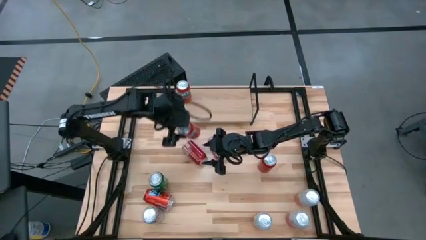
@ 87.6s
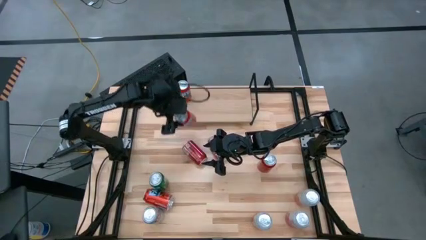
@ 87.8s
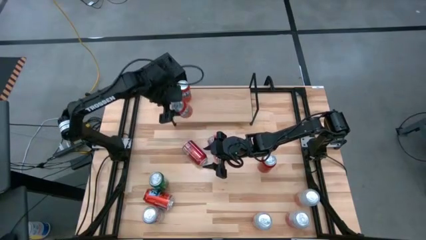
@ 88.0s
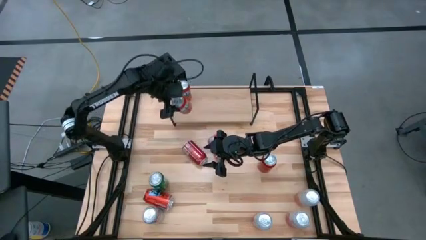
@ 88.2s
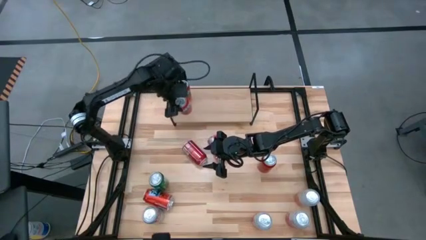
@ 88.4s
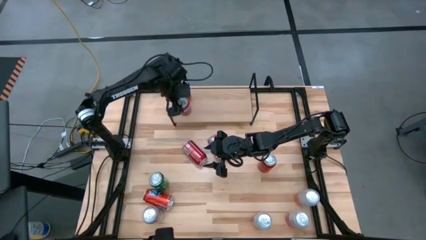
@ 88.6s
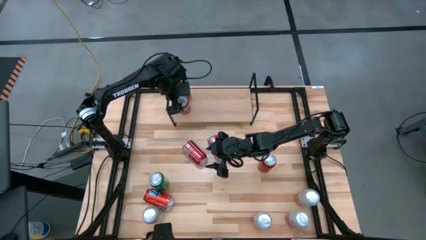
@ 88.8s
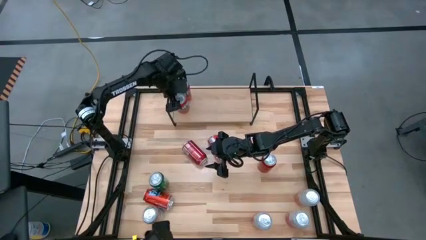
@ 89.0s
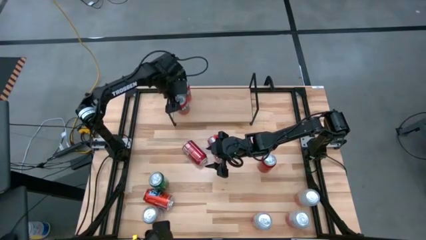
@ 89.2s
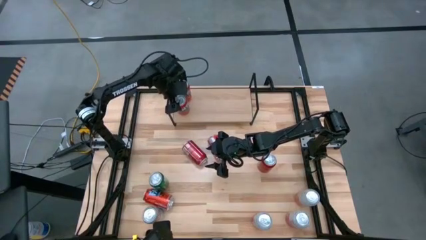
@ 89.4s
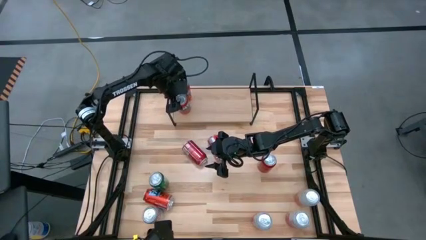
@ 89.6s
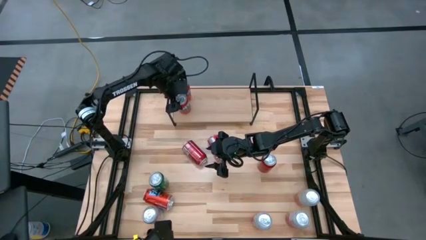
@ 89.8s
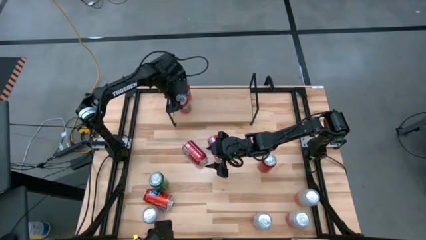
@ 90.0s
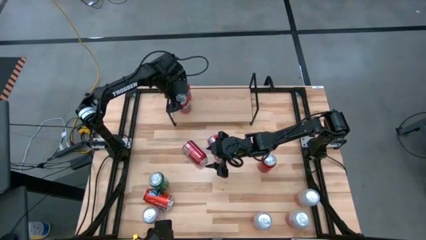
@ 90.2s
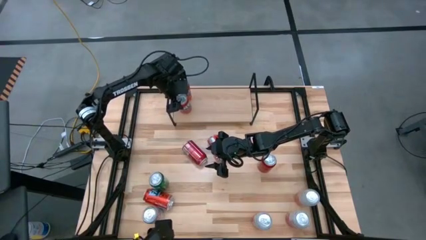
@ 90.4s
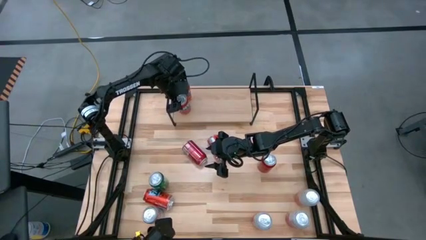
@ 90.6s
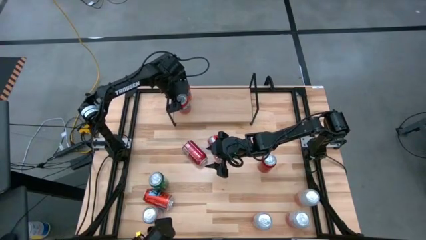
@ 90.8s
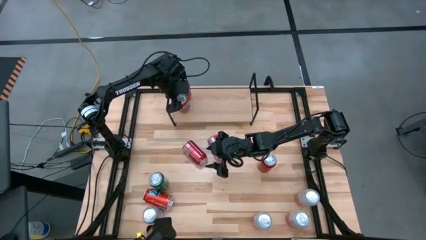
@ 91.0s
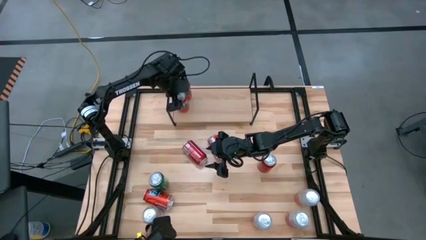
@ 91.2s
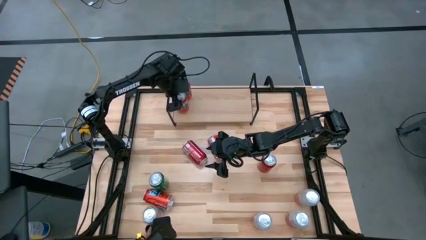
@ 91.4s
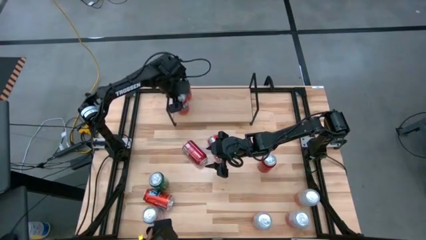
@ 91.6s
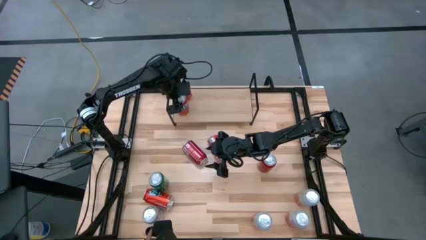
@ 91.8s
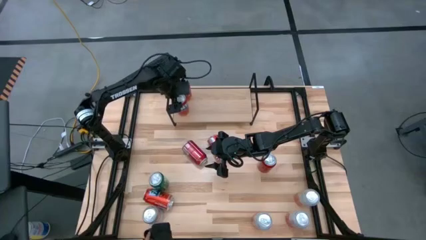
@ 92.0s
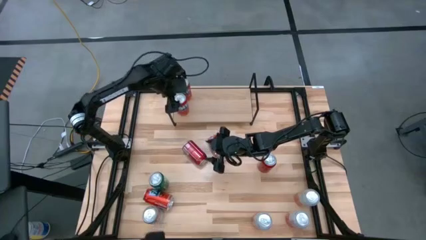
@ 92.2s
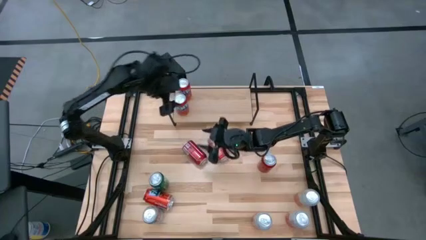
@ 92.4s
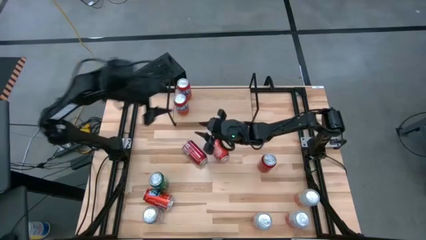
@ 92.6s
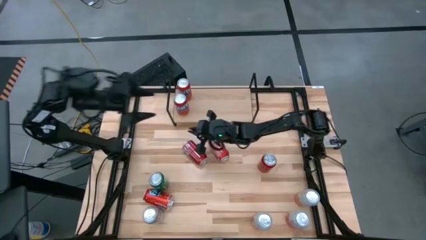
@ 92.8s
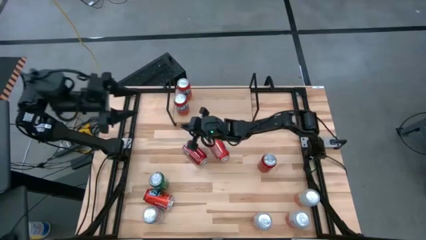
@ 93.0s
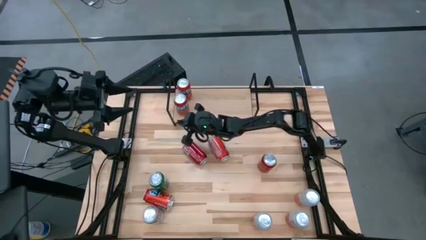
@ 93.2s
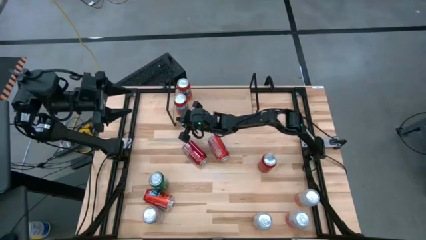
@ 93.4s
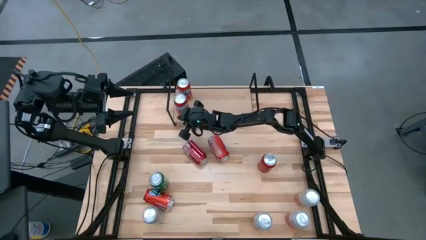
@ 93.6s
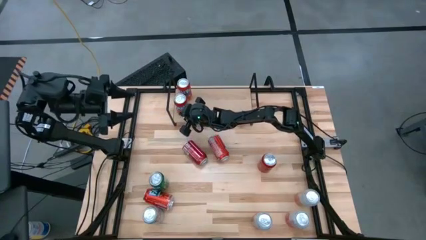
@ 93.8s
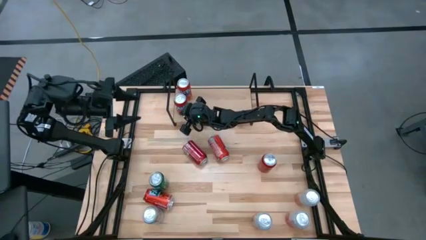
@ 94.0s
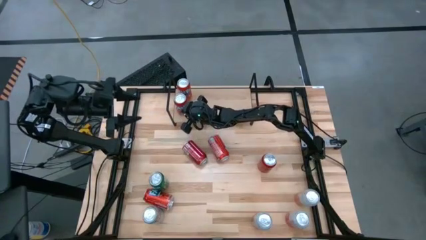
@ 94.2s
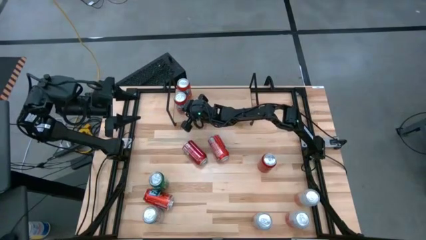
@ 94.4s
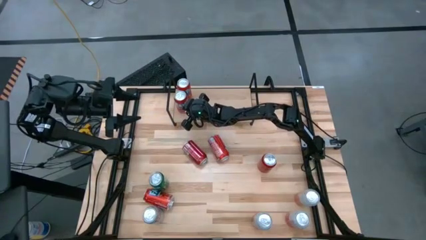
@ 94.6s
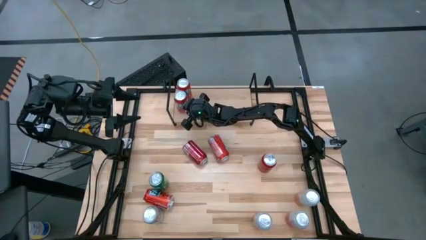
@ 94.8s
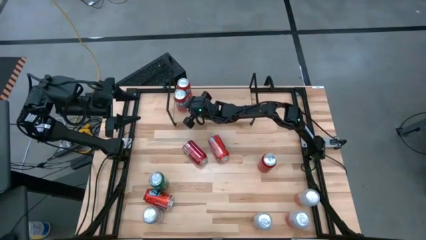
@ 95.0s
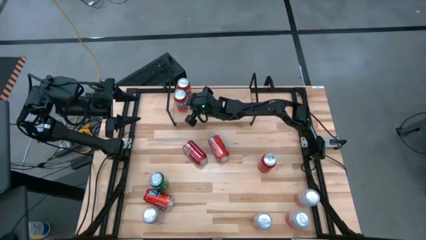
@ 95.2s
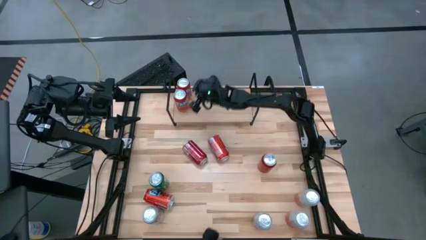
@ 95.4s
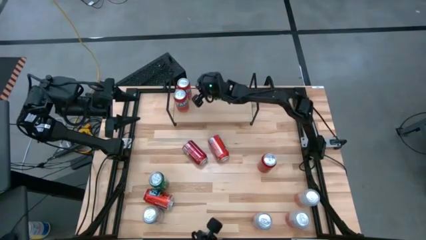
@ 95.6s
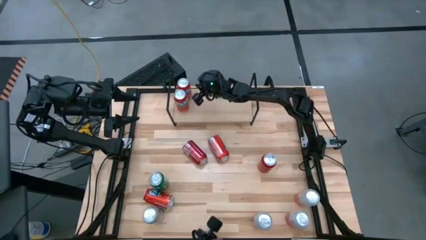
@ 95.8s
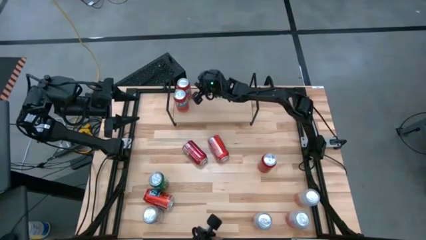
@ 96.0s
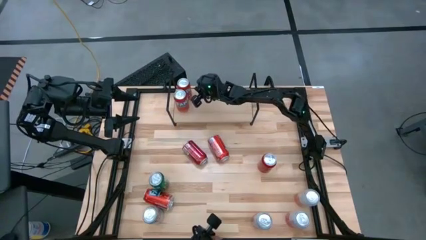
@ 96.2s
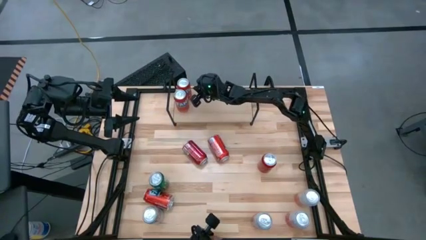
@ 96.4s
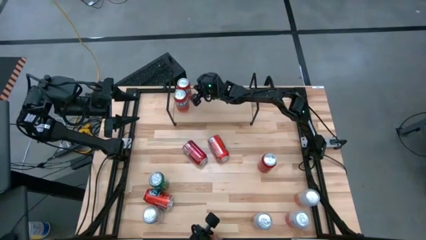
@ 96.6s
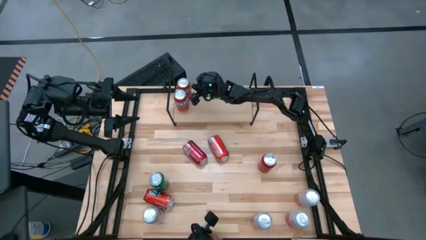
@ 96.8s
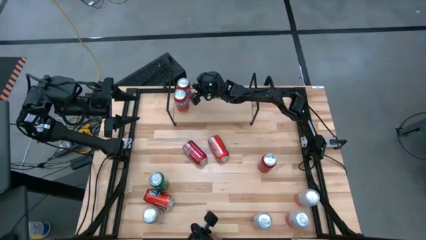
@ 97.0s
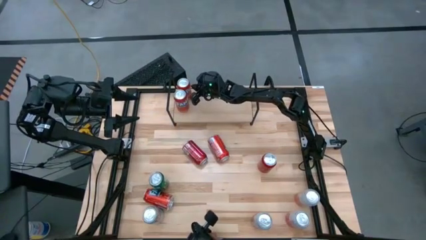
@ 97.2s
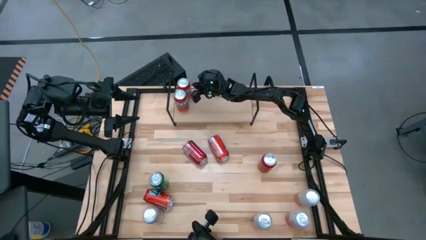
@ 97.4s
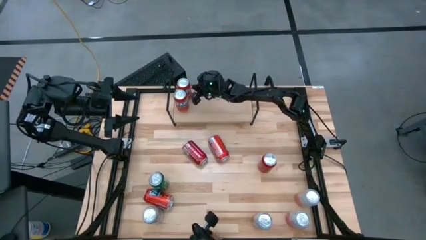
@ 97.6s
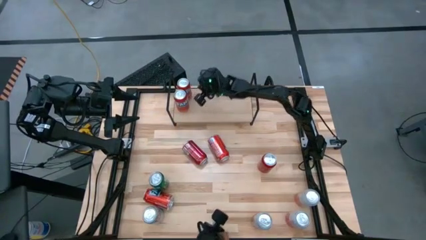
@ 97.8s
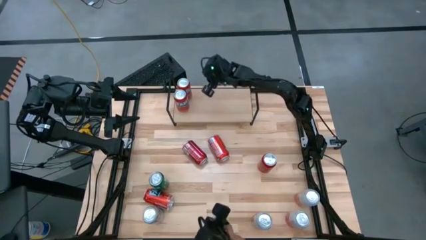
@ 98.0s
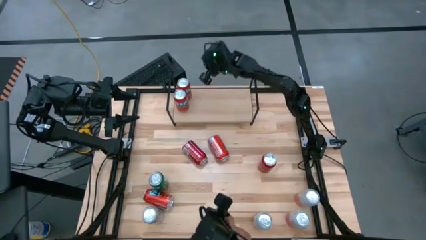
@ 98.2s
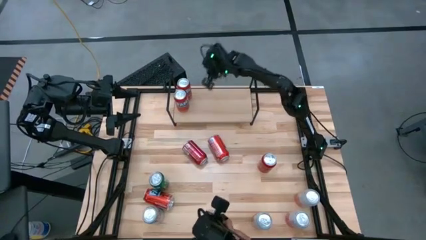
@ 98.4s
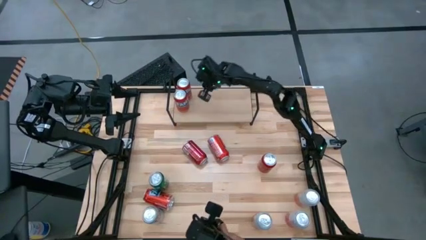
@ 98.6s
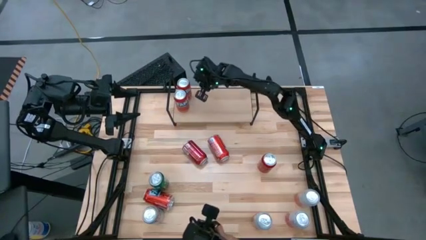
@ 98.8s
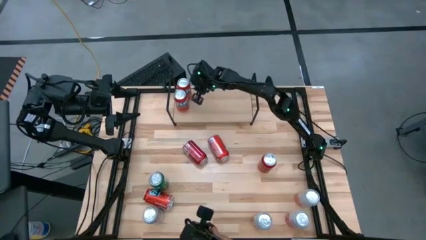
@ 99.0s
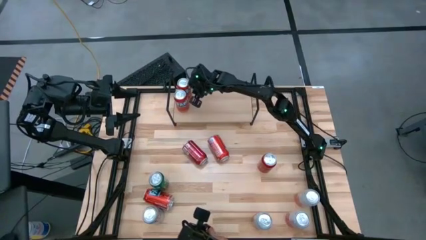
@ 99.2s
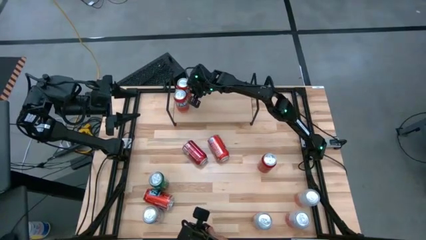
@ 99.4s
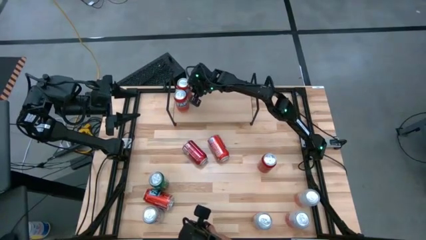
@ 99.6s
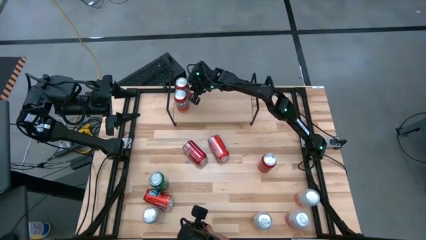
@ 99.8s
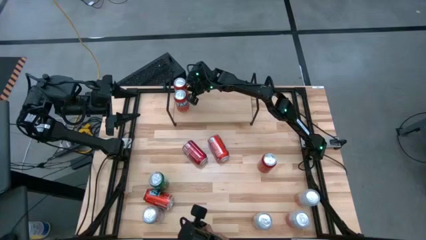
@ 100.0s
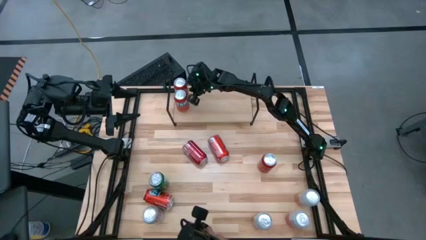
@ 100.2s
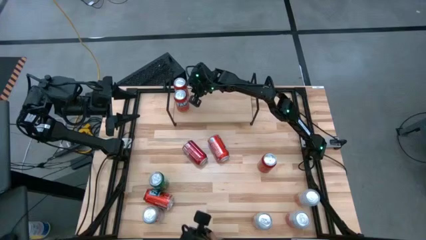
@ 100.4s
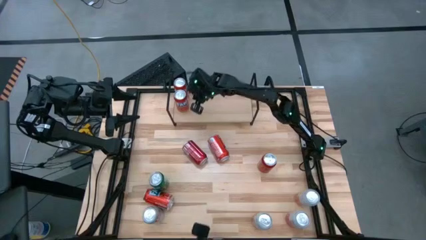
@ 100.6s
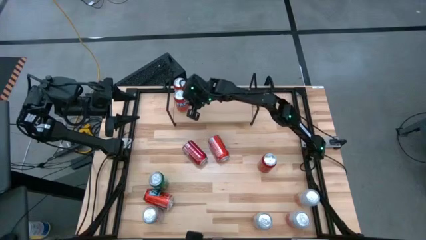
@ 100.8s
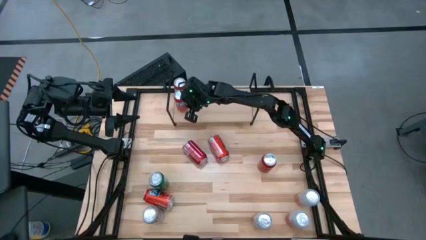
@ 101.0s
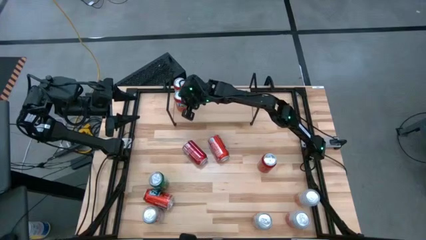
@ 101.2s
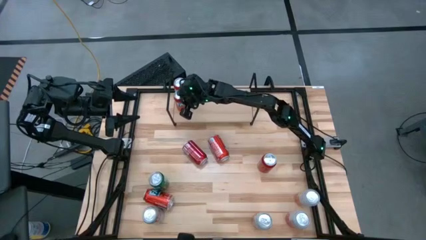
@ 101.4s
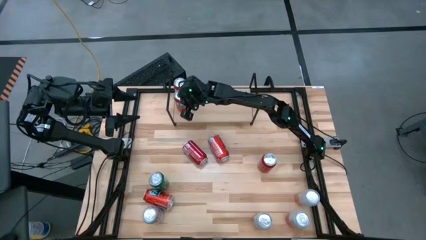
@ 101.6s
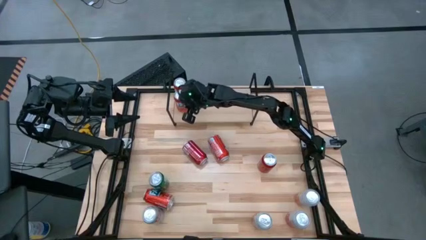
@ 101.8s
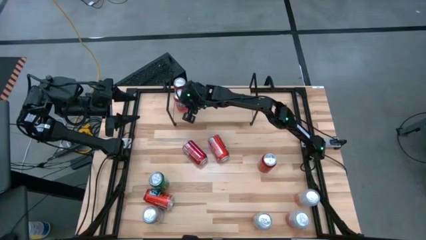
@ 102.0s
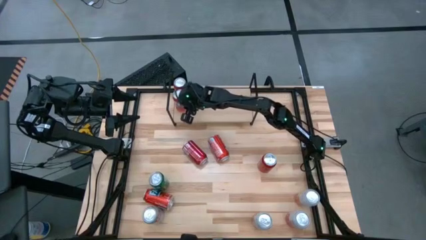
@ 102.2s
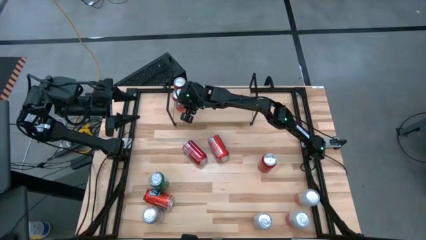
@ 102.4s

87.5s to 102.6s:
Task: Place canned beverage on shelf
Put the red soda can on the shelf and align with the other red soda can
